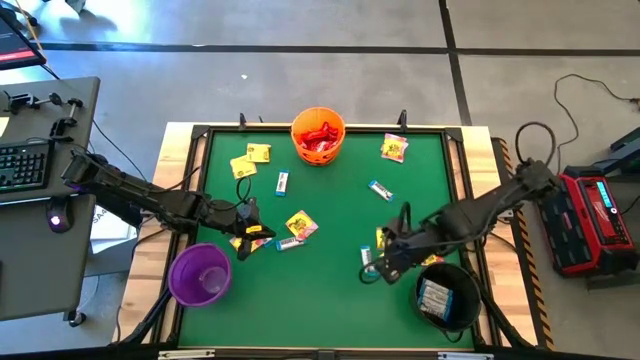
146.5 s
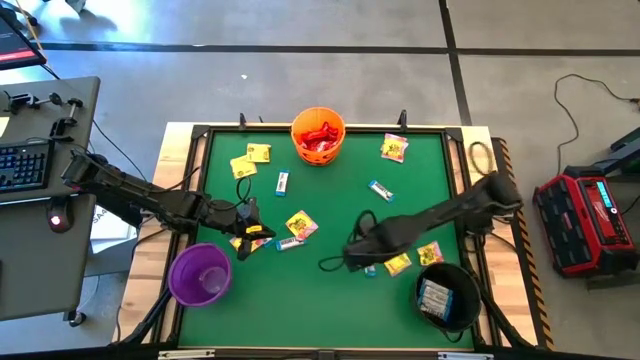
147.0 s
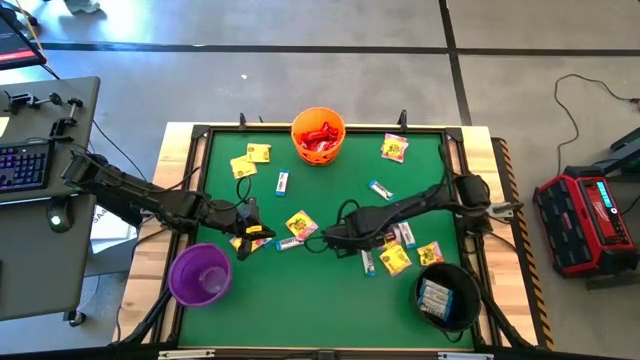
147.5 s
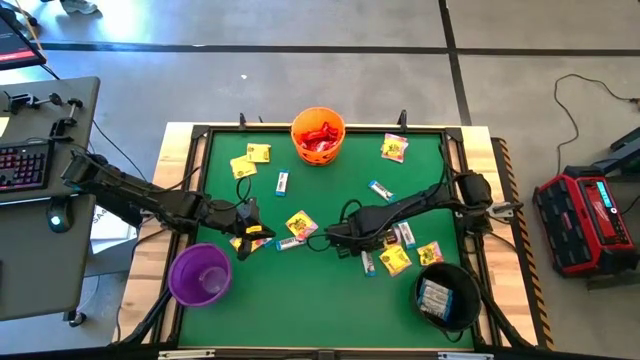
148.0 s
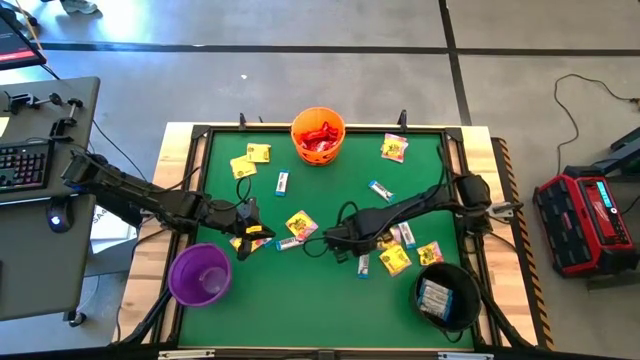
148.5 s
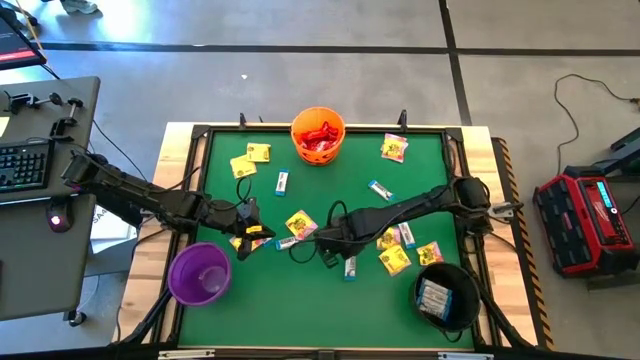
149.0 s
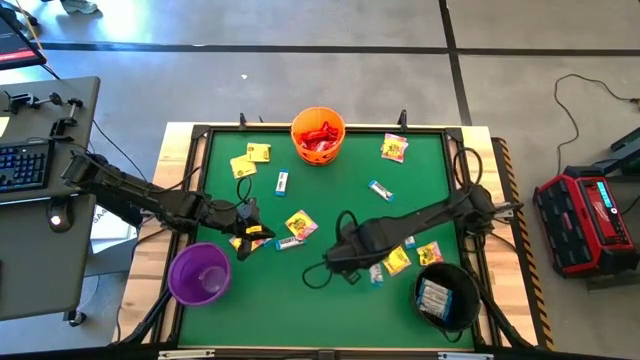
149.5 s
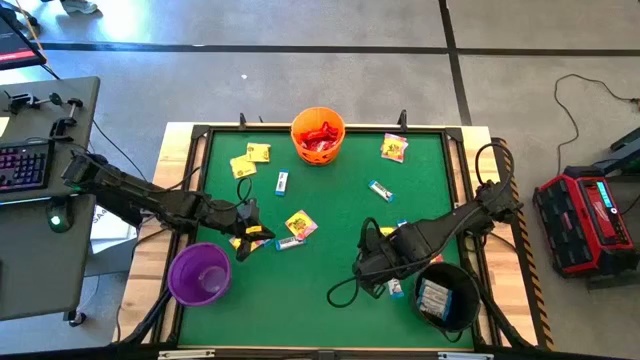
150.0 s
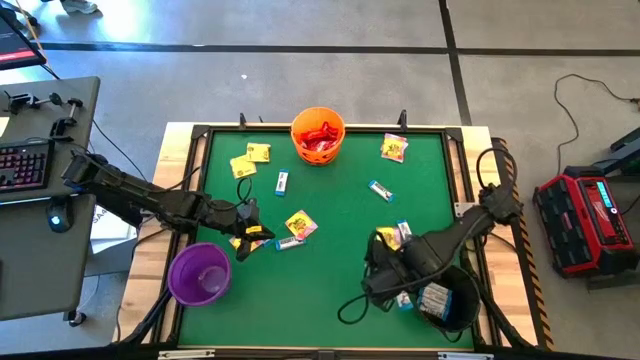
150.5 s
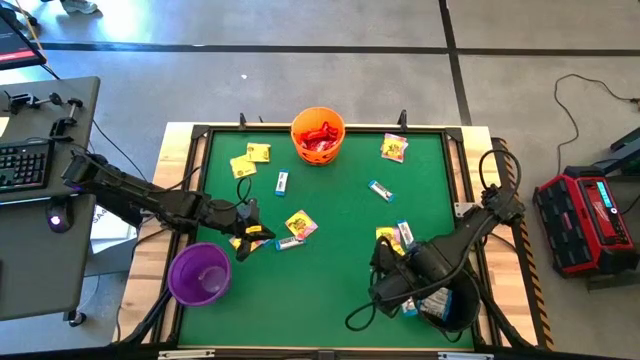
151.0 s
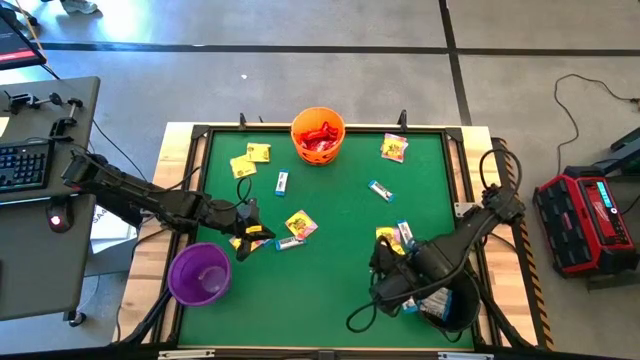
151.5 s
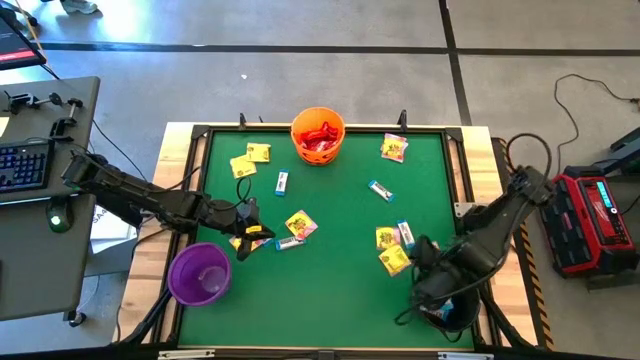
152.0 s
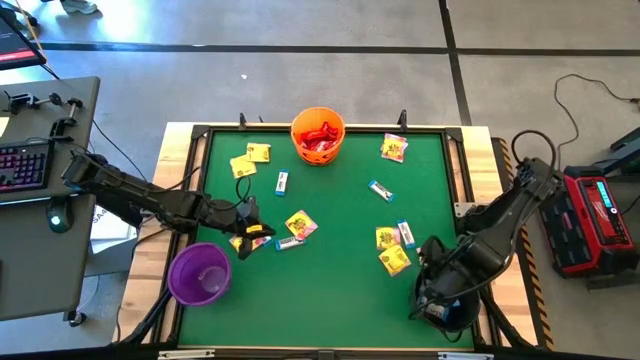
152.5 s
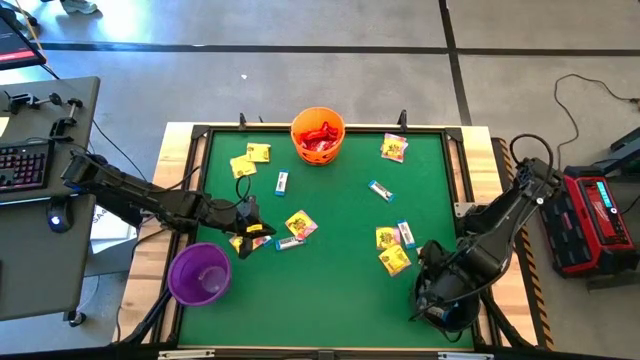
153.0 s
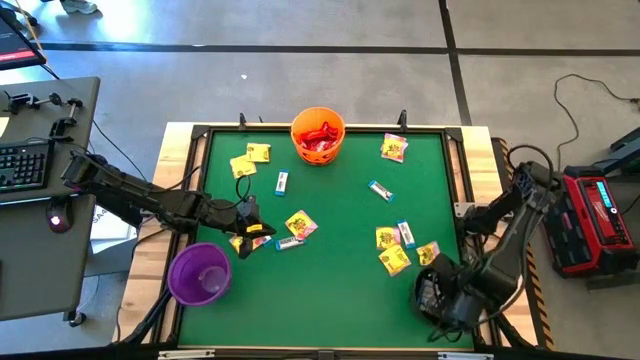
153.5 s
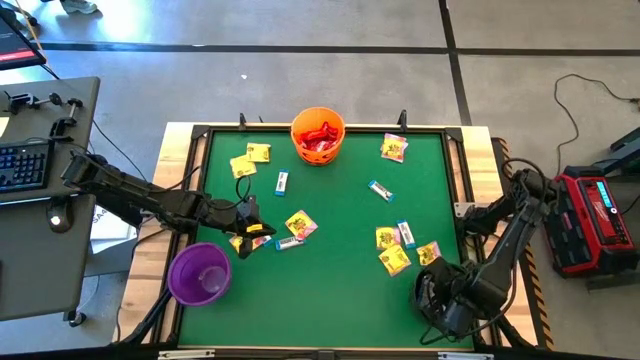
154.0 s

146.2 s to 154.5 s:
Task: Sort candy by brand, put in halloween buckets
Put the white chocolate bar into the black bucket

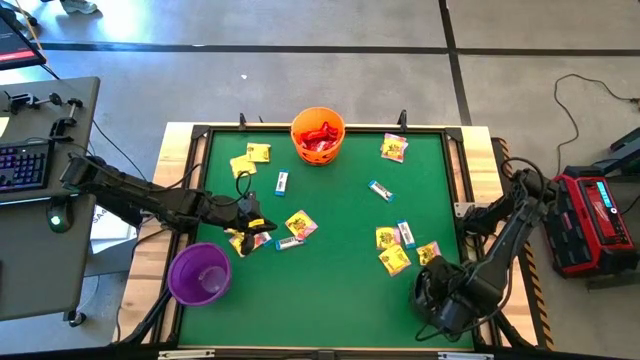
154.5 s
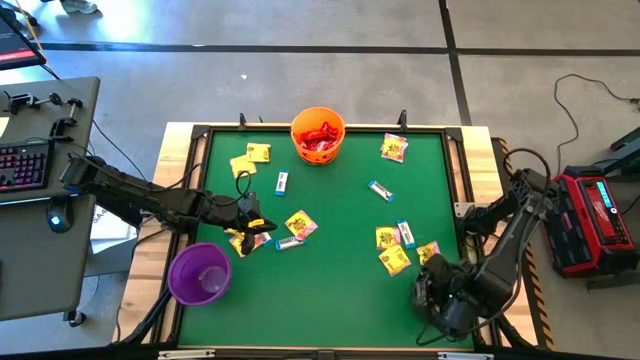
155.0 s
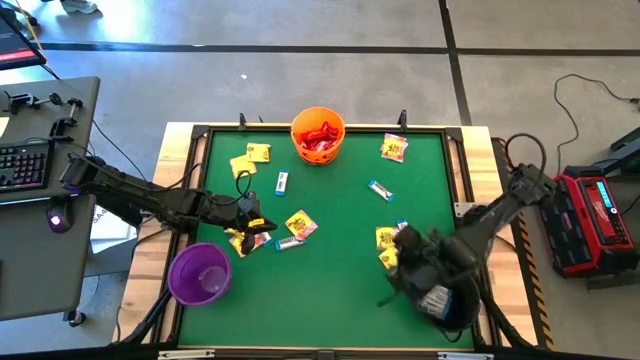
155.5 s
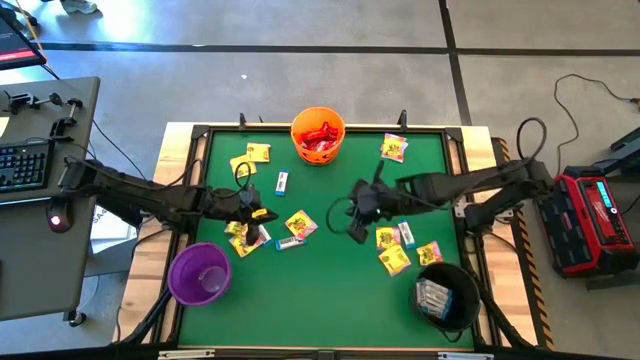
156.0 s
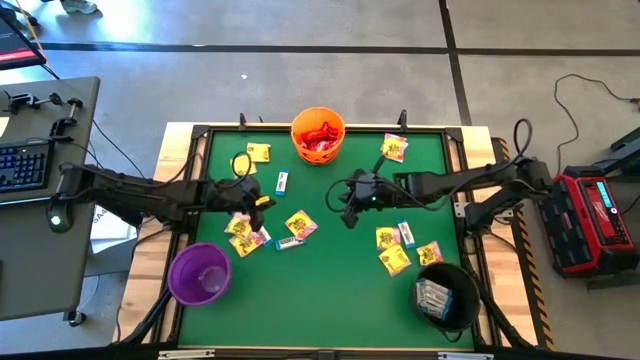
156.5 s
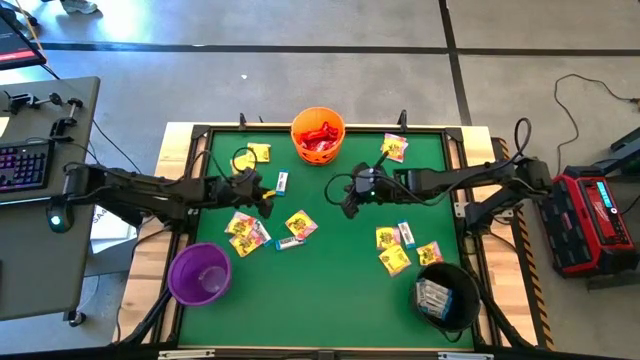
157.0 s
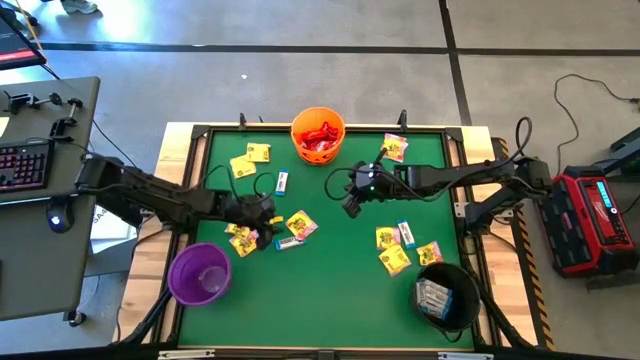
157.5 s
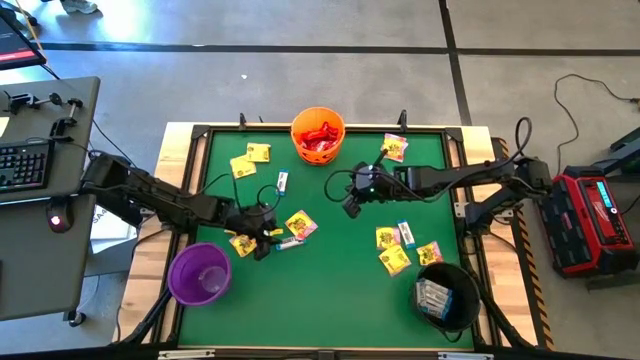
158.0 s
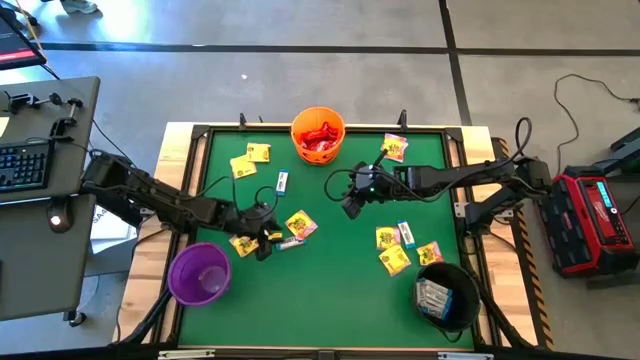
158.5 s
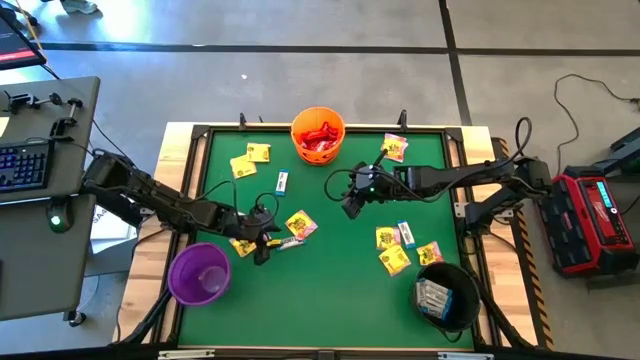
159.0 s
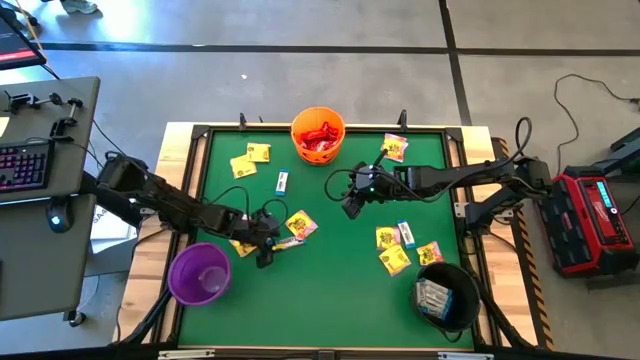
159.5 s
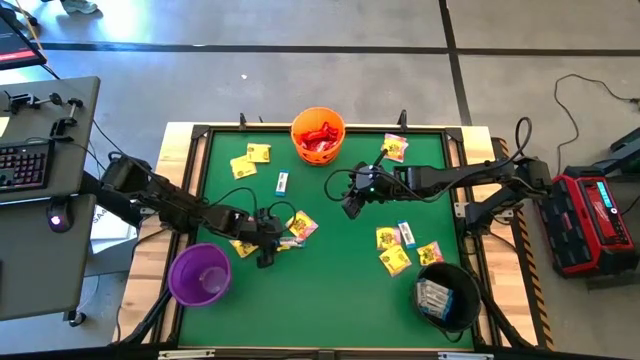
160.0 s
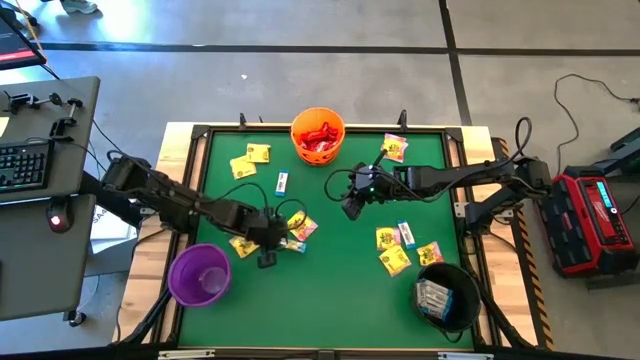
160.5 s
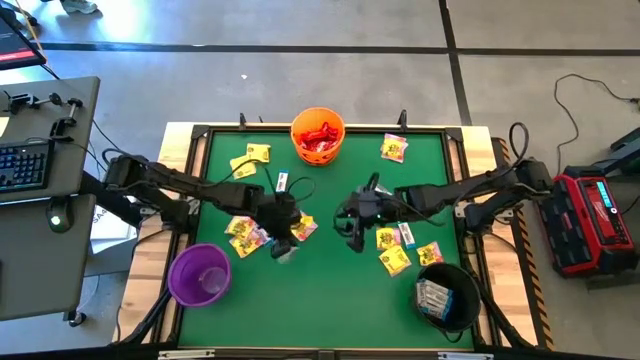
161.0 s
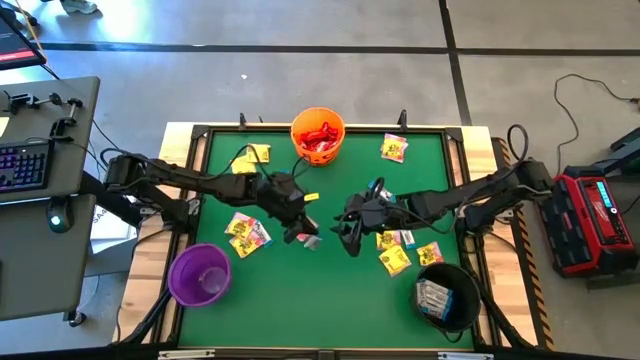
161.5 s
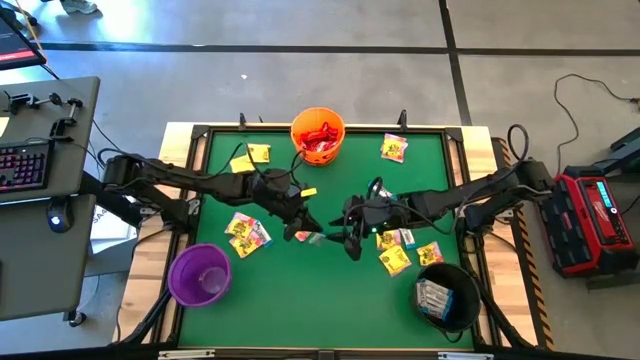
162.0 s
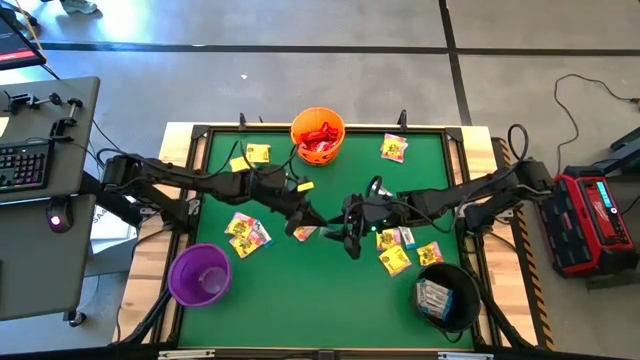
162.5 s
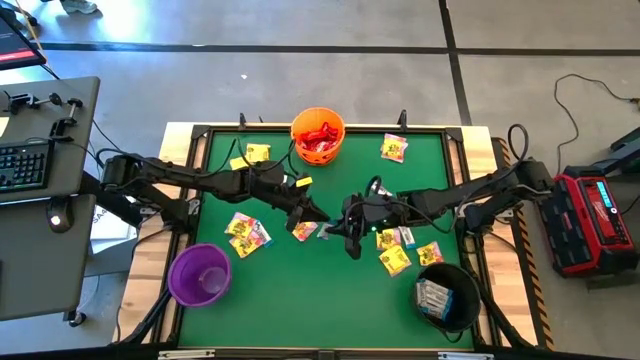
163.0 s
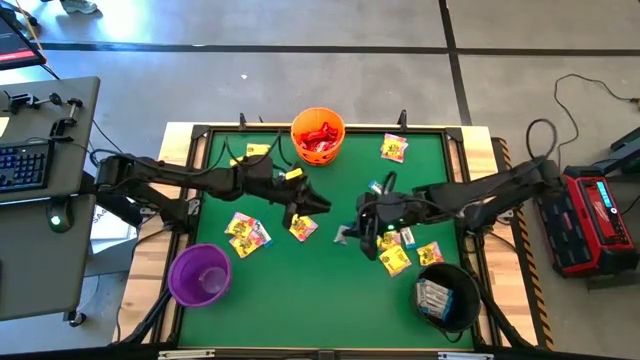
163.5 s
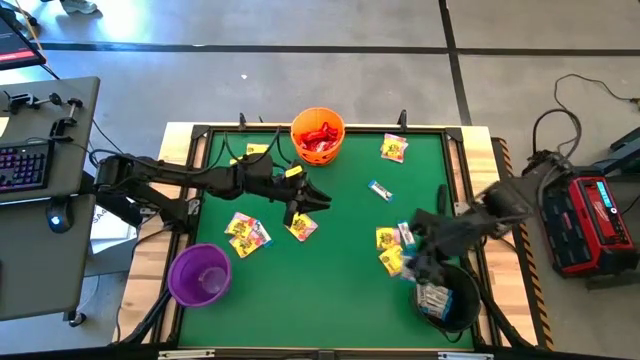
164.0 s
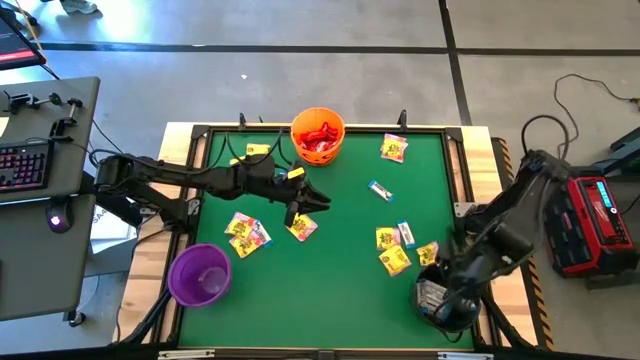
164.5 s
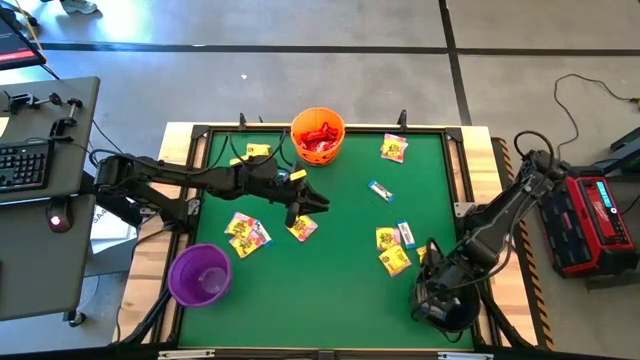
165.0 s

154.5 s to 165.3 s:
Put the white chocolate bar into the black bucket

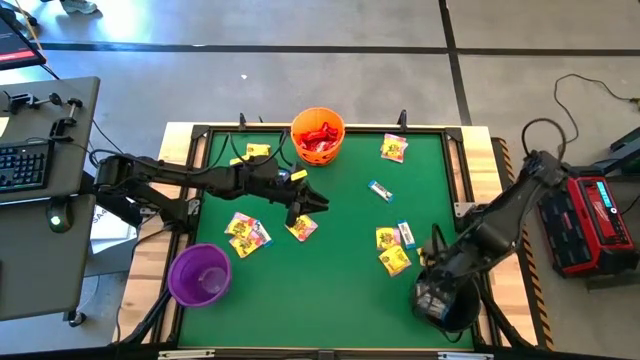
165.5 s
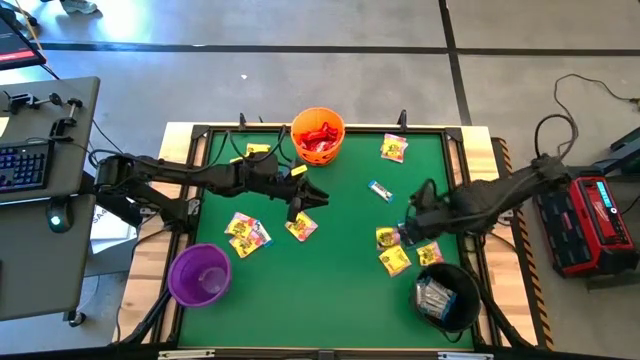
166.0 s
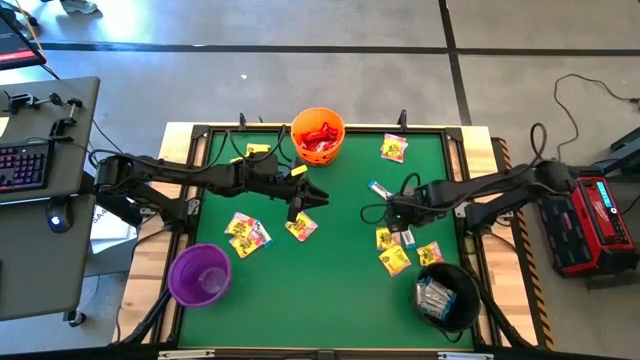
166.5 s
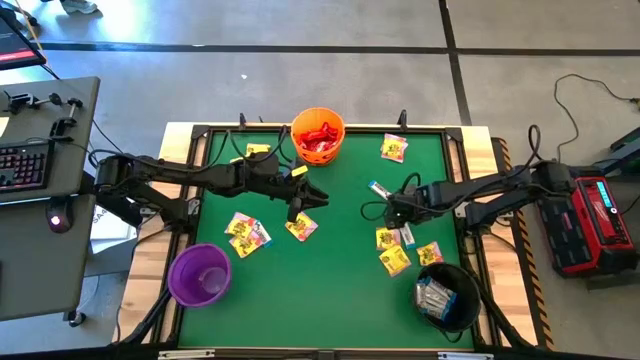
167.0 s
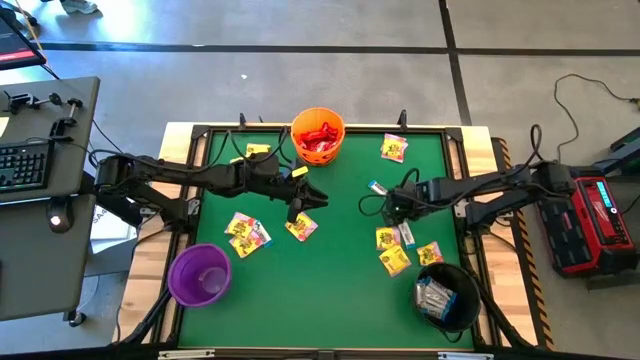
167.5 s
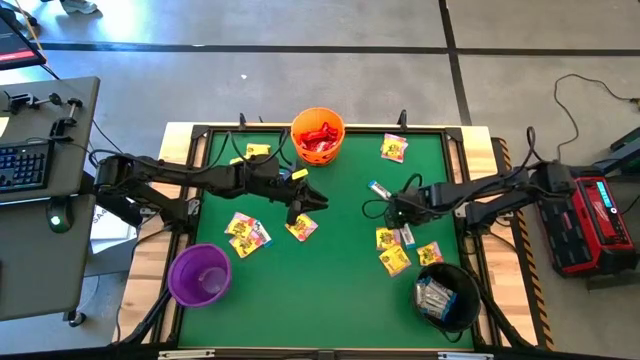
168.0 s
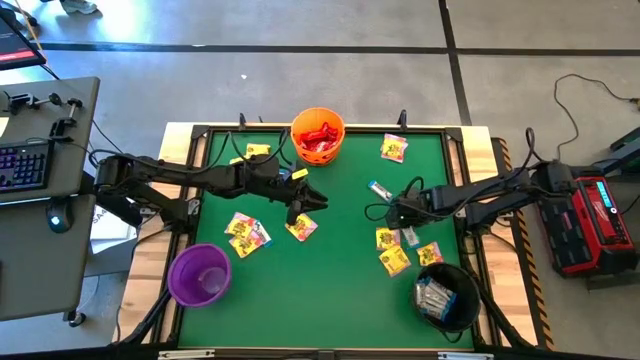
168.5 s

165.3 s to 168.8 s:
Put the white chocolate bar into the black bucket

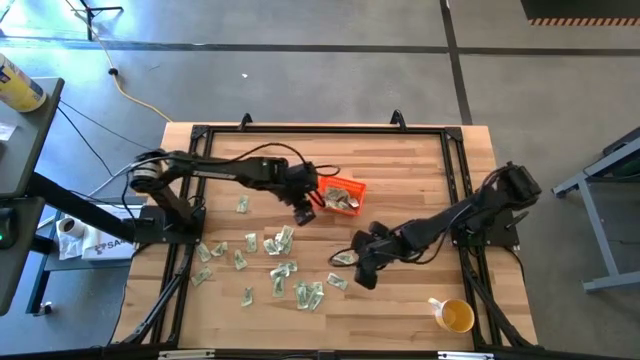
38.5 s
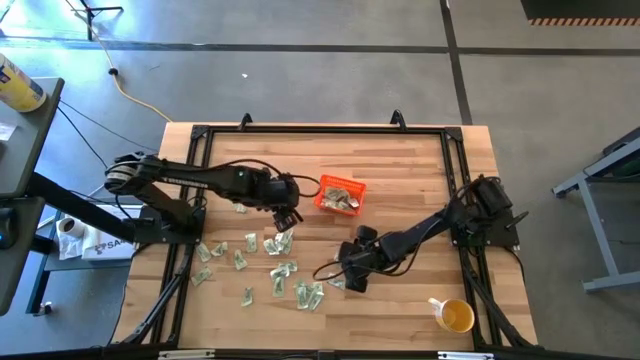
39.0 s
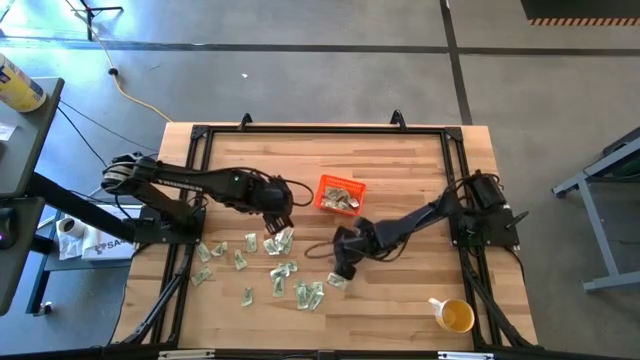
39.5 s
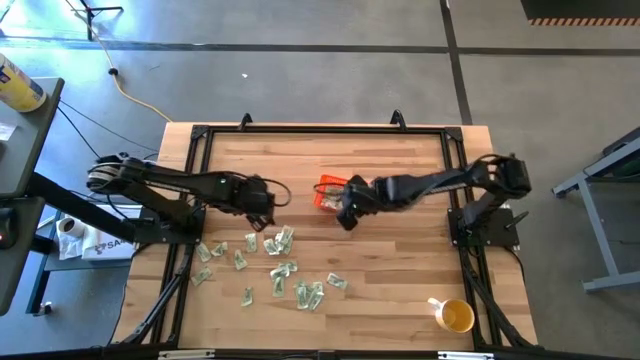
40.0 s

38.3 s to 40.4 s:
Task: Pick and place Stevia / Truvia into bins
Put the green stevia packet into the orange basket
